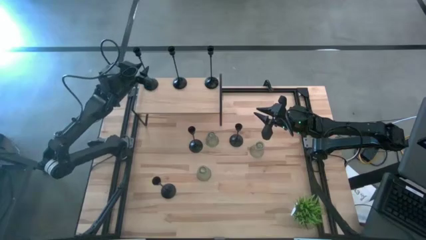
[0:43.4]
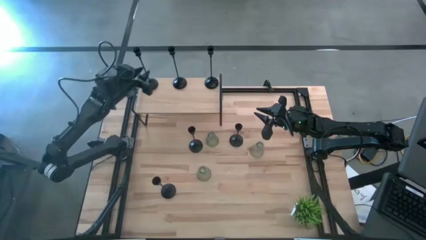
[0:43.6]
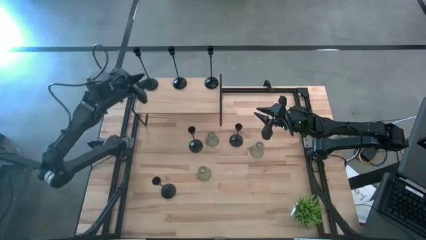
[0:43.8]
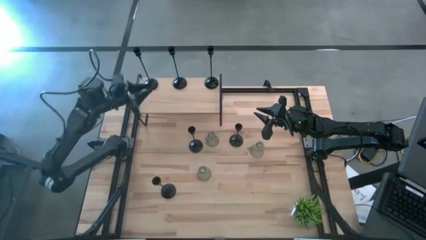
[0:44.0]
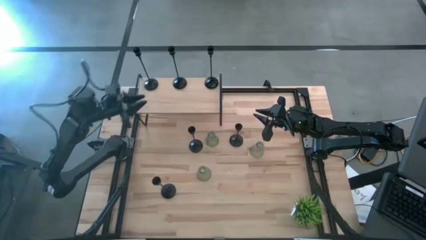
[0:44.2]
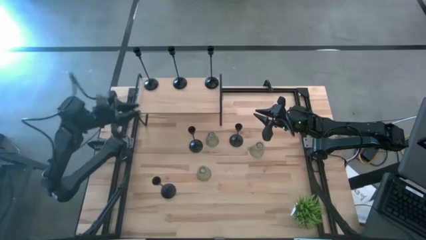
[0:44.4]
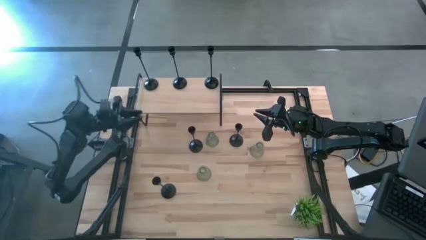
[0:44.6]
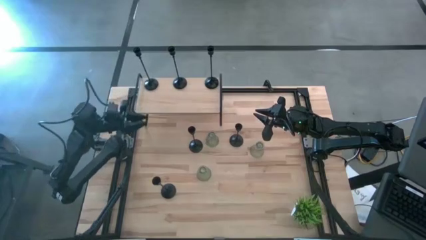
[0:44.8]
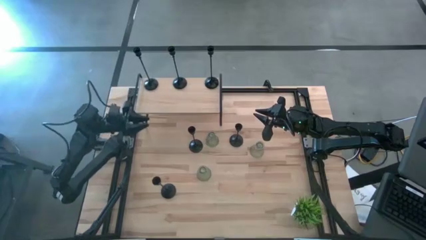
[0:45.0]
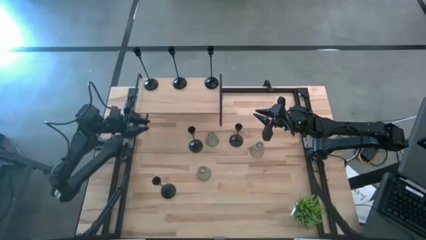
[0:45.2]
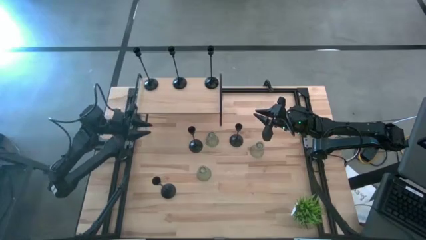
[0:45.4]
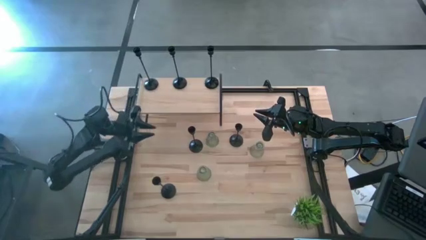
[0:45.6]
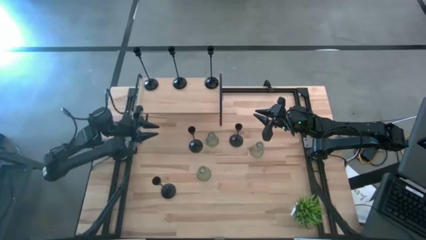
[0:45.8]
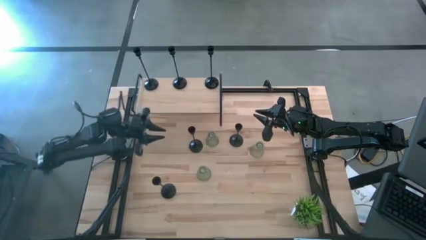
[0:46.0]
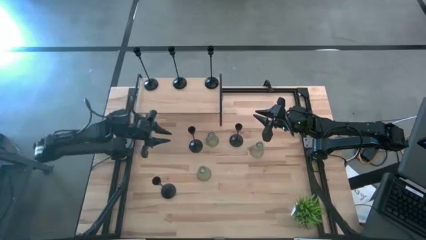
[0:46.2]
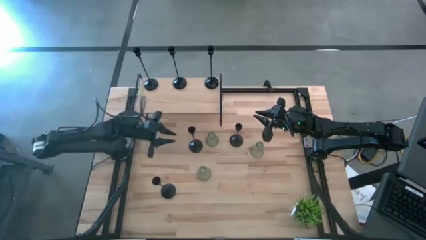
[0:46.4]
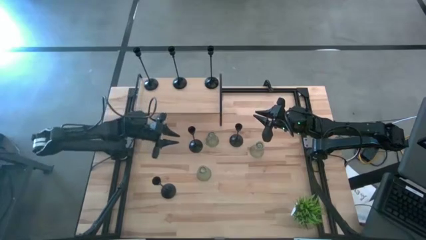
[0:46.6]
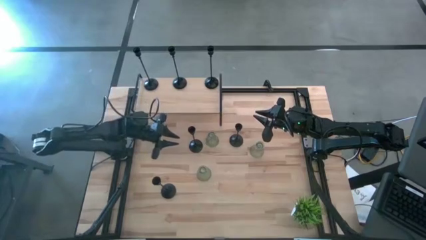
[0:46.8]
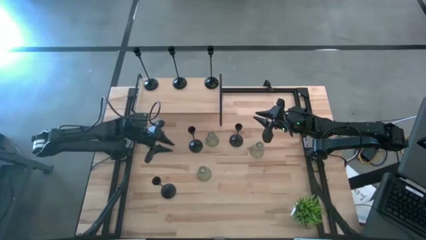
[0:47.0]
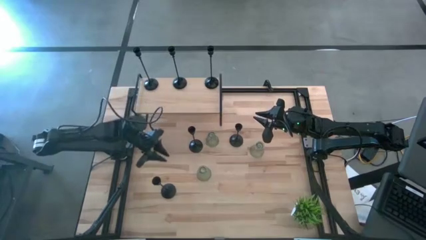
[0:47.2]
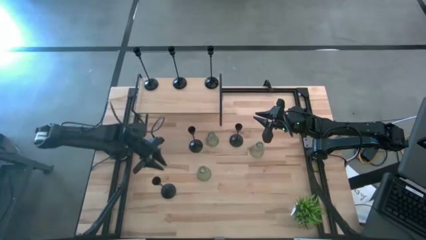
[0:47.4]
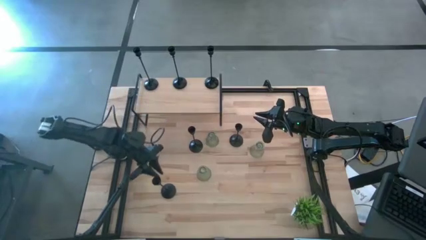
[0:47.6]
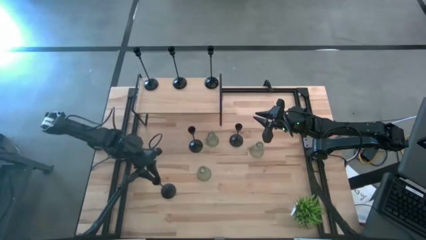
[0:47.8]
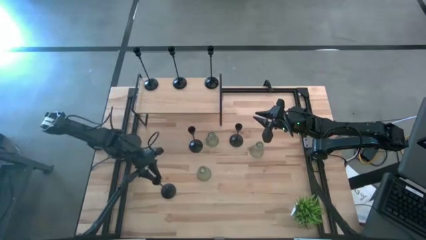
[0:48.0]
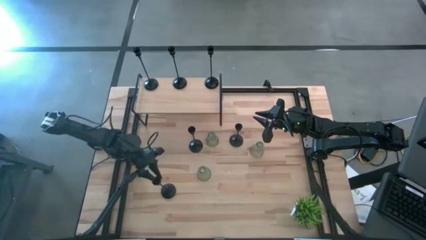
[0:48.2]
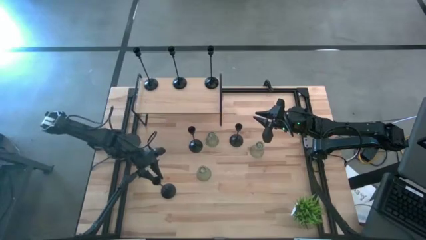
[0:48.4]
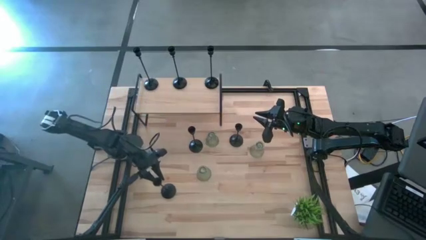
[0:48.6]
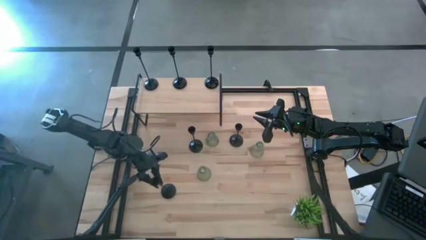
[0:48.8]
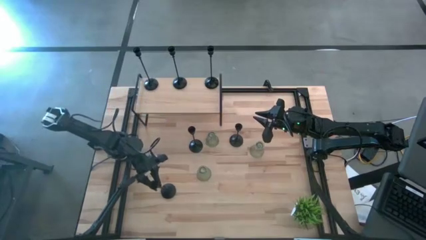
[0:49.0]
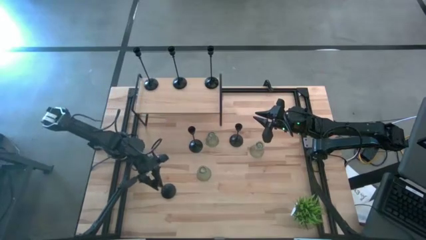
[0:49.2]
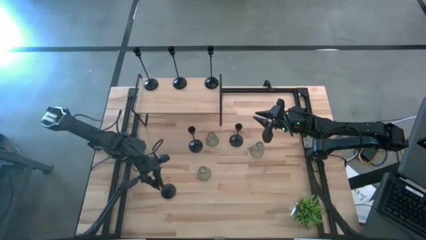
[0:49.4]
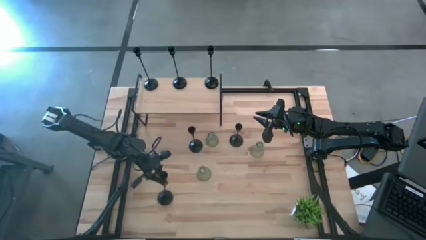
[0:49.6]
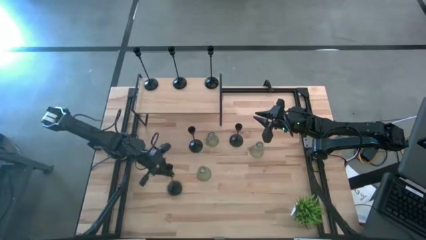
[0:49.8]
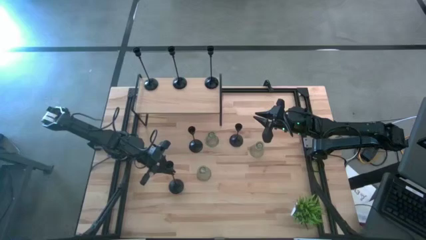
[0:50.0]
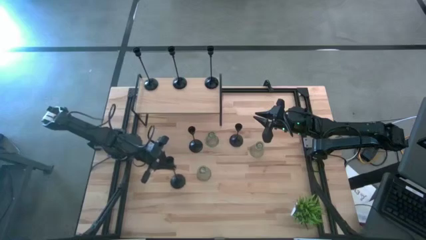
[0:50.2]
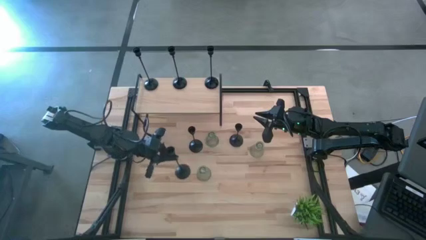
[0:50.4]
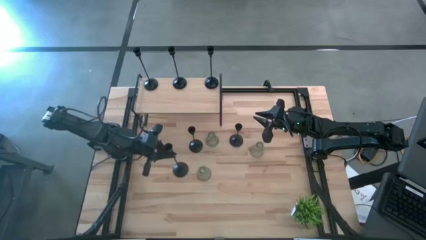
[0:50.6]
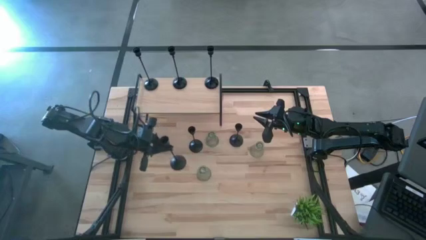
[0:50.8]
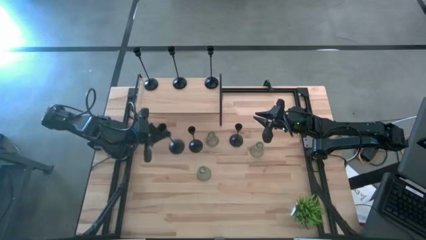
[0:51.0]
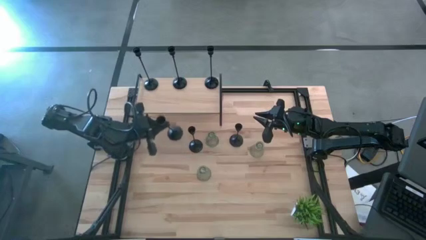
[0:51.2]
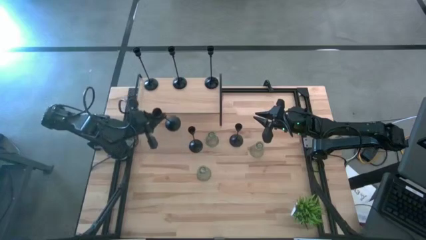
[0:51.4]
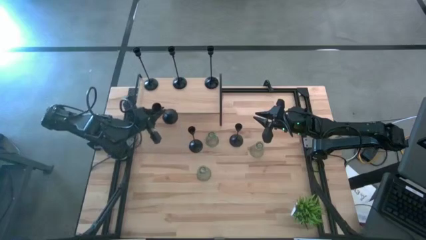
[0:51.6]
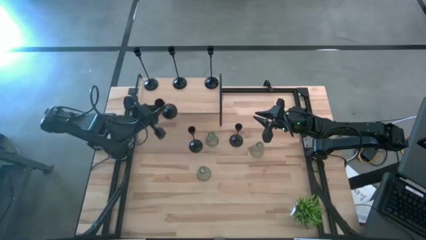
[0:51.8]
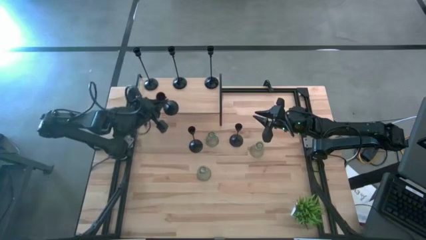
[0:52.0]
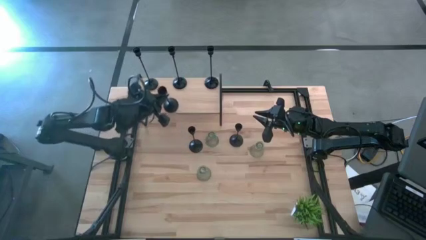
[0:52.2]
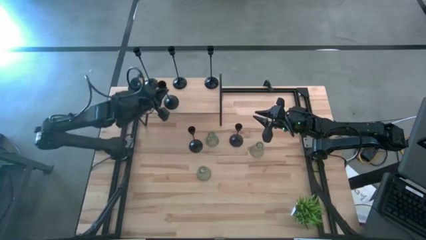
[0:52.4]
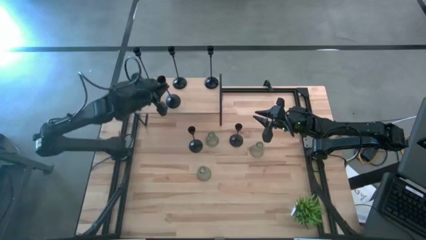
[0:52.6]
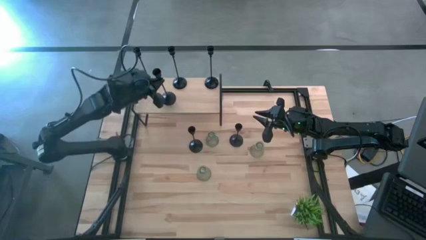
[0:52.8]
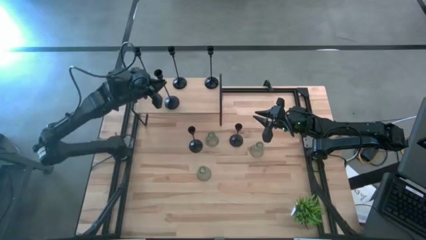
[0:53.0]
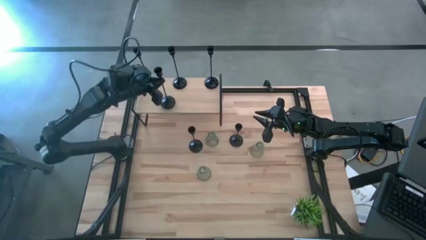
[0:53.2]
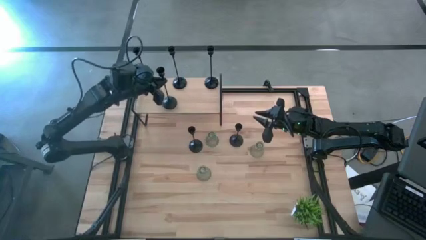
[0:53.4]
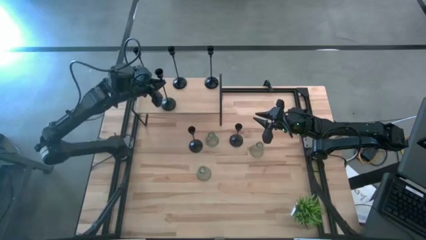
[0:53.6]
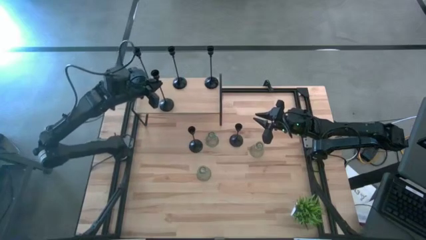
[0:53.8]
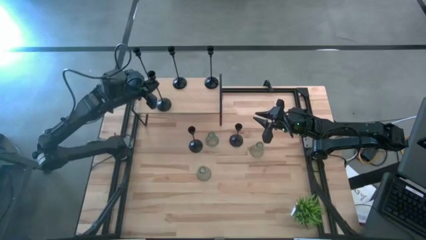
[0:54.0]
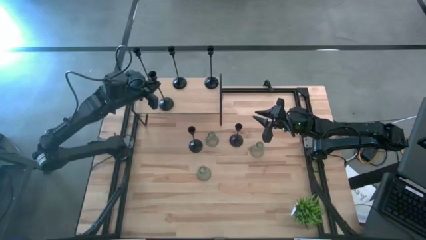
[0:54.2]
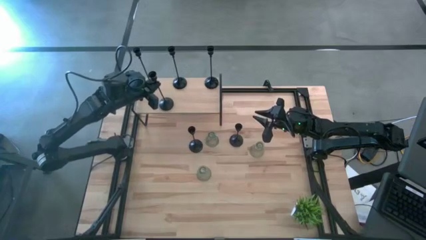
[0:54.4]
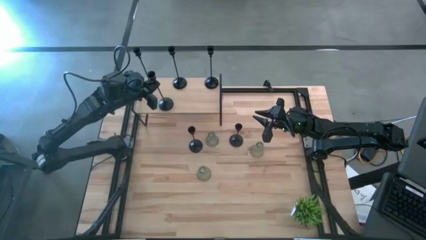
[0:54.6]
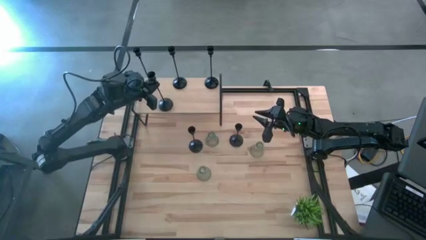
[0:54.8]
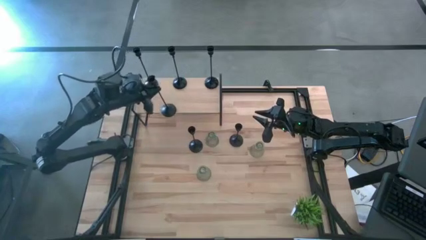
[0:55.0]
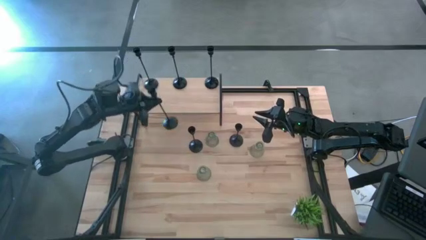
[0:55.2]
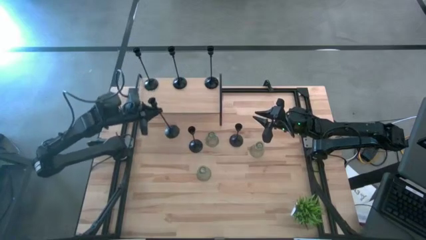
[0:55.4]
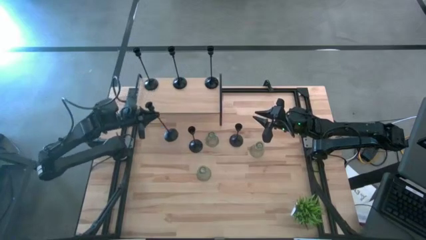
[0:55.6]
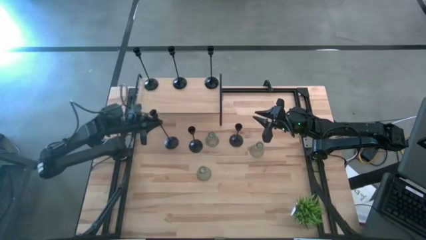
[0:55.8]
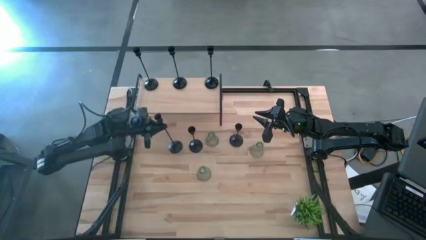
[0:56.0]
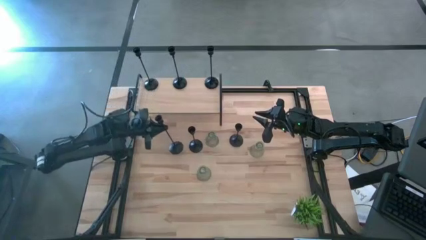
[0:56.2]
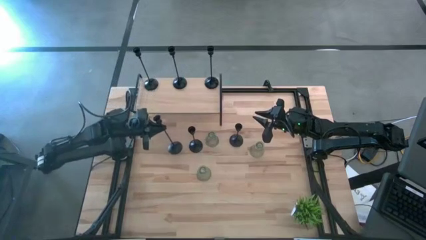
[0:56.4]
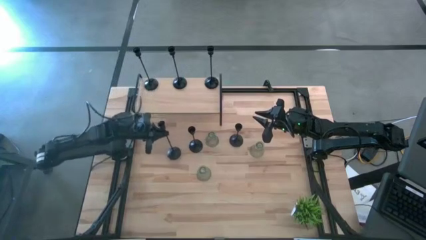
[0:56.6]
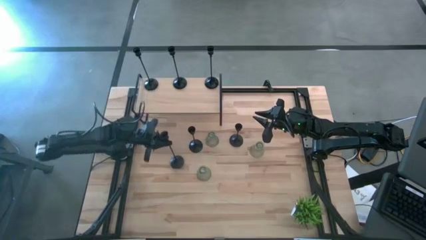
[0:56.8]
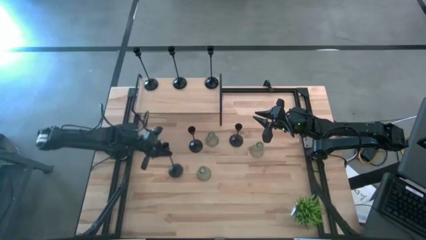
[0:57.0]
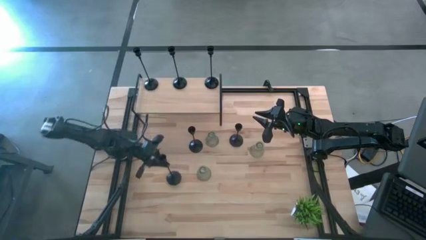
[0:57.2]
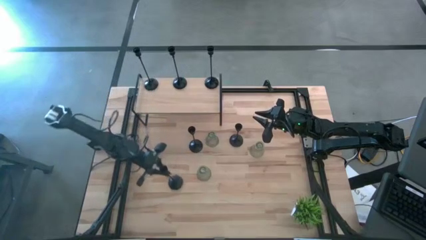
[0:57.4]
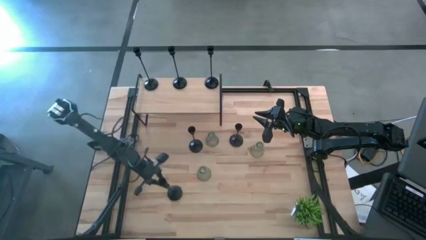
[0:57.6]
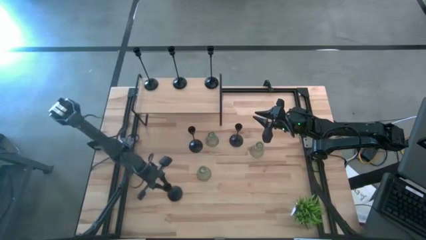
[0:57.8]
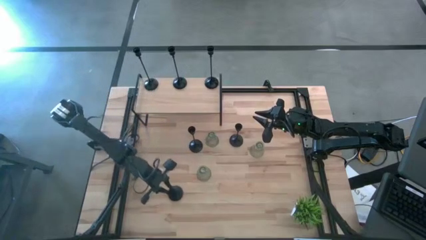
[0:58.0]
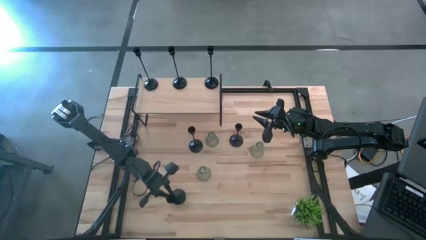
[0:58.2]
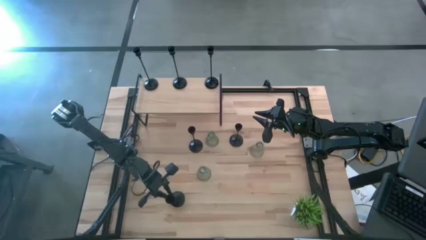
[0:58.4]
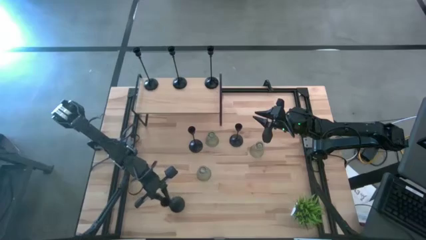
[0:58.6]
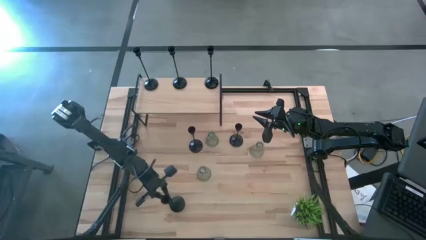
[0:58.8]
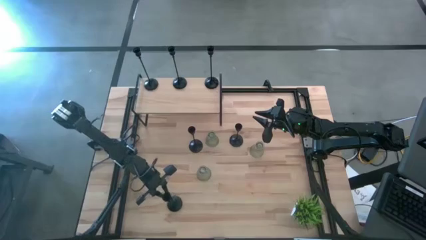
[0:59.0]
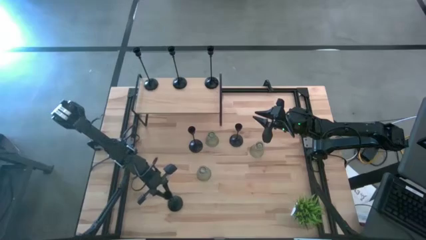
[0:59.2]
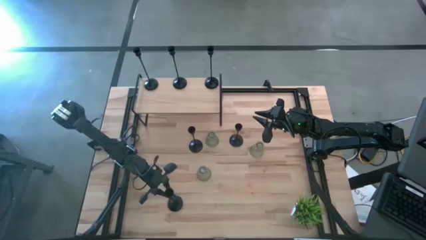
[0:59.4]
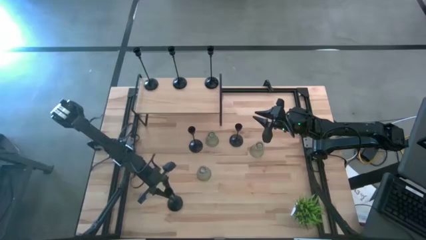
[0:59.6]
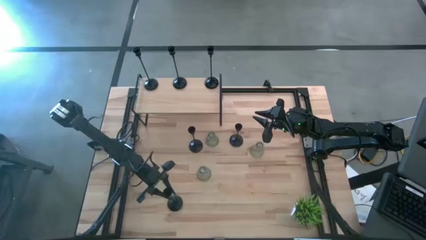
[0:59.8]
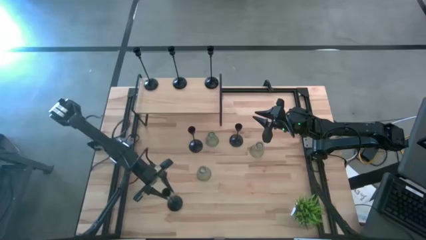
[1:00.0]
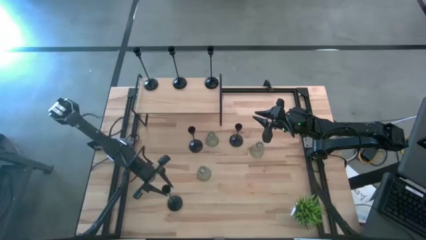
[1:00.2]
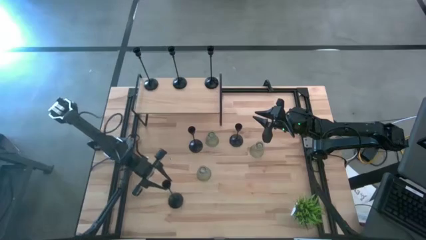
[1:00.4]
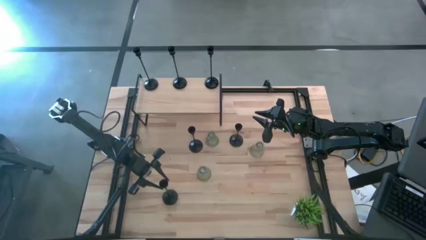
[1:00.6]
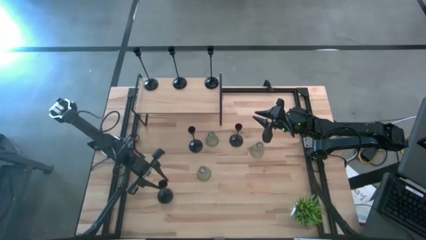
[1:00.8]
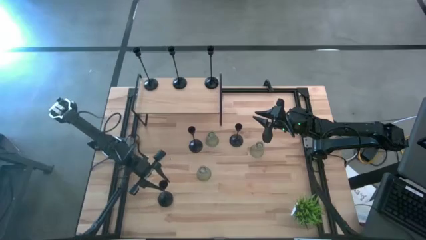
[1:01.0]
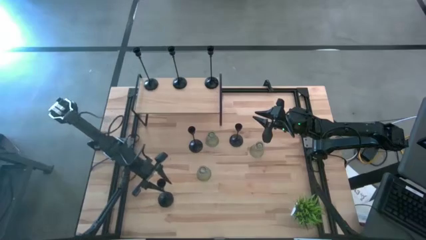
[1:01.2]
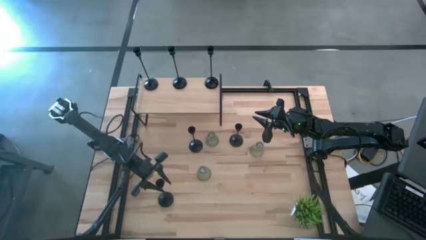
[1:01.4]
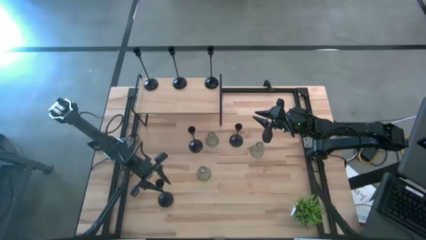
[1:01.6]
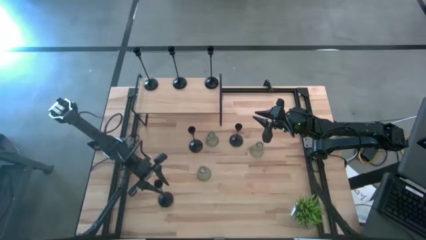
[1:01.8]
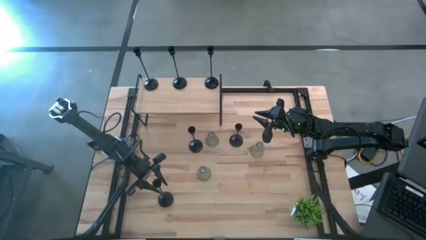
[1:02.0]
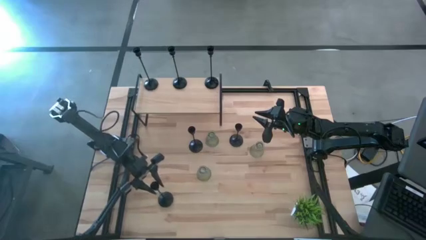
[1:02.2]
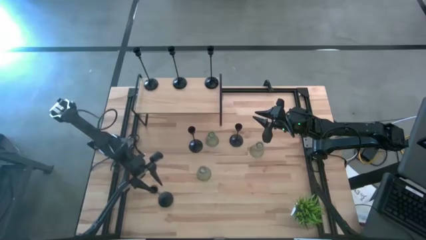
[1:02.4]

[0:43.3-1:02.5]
Task: Pick & Place candle stick holders
Put the black candle holder on the shelf
